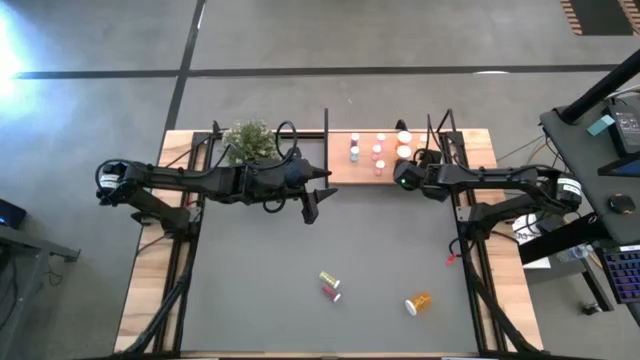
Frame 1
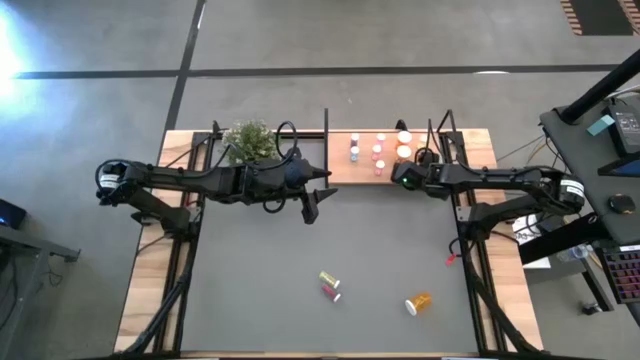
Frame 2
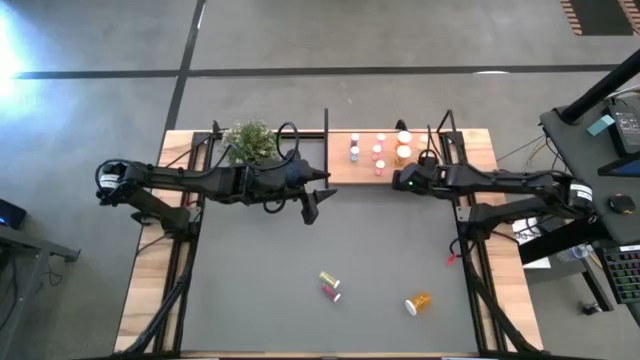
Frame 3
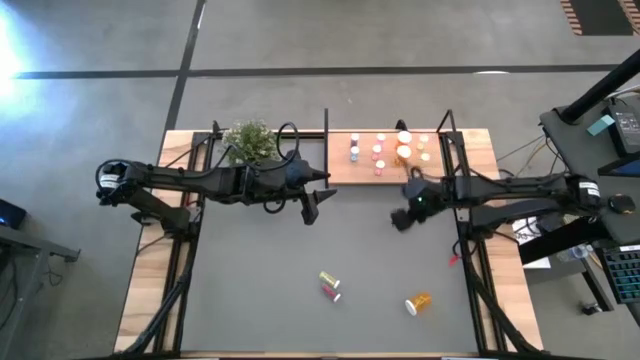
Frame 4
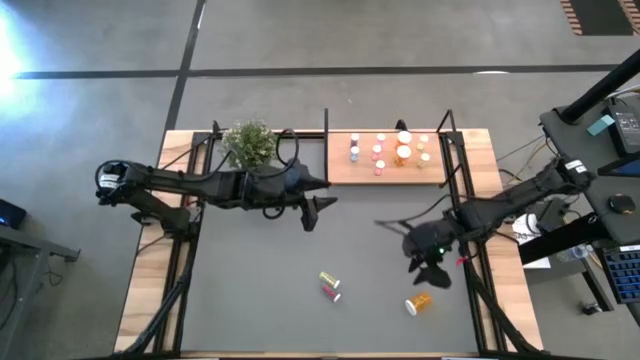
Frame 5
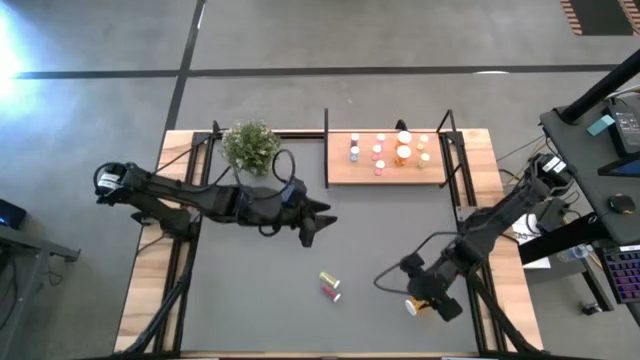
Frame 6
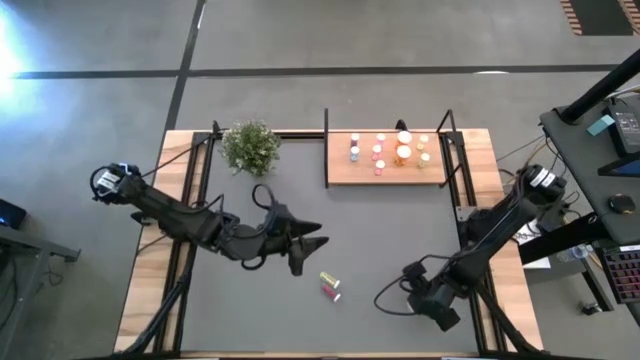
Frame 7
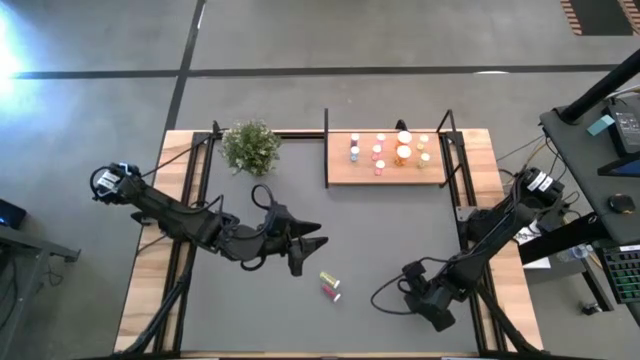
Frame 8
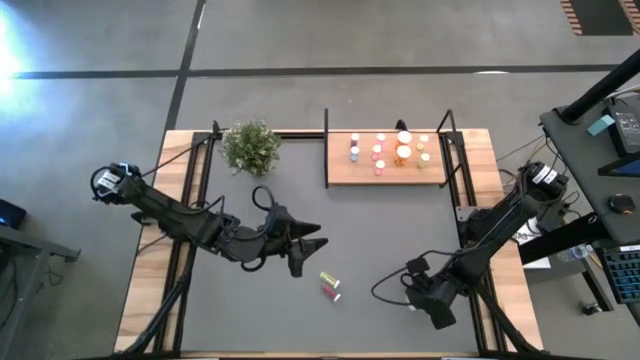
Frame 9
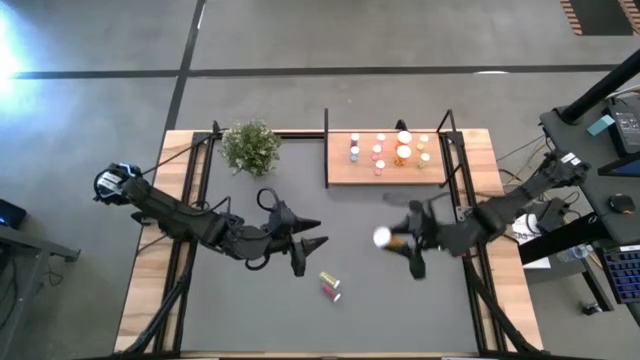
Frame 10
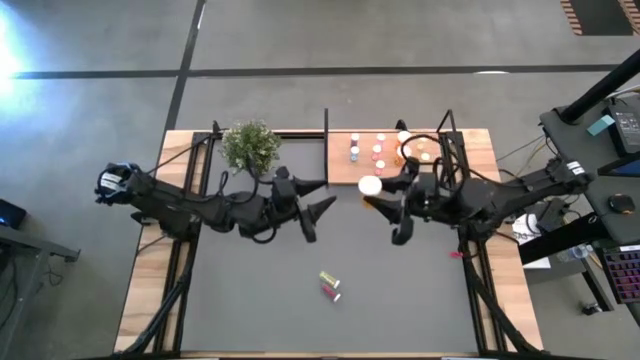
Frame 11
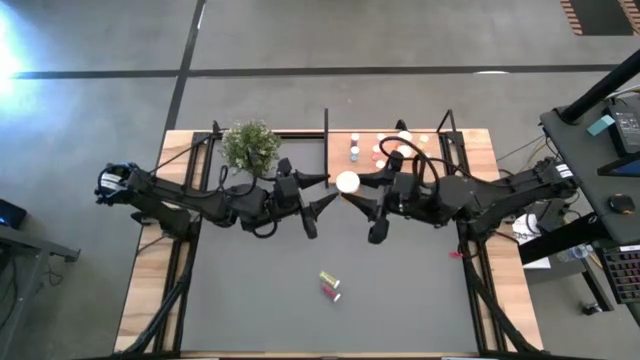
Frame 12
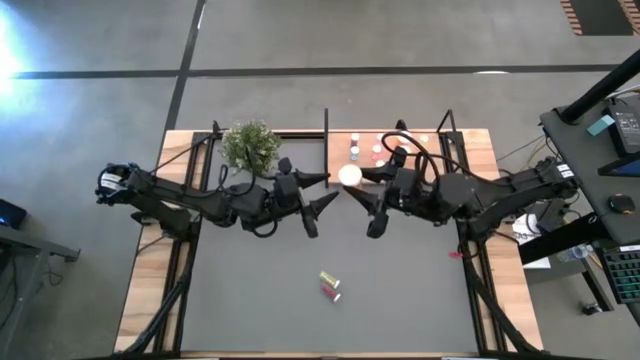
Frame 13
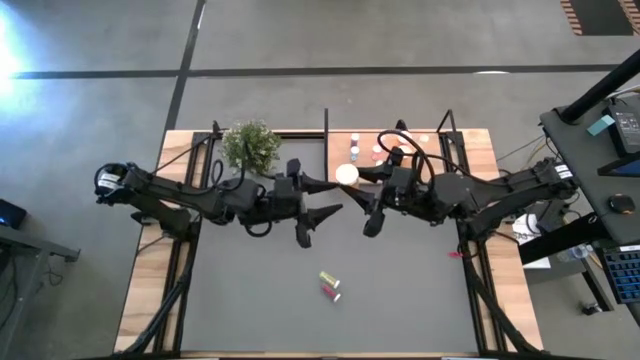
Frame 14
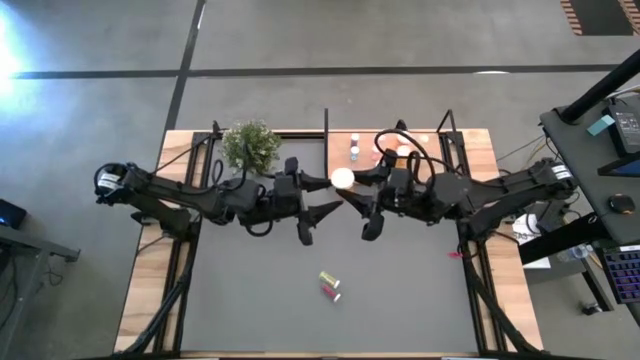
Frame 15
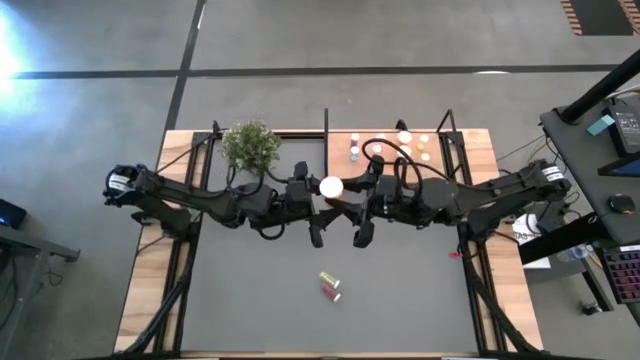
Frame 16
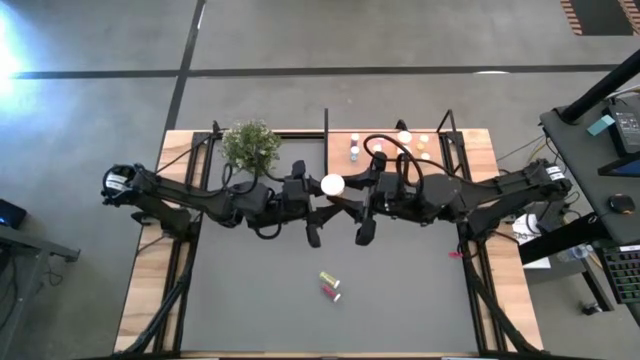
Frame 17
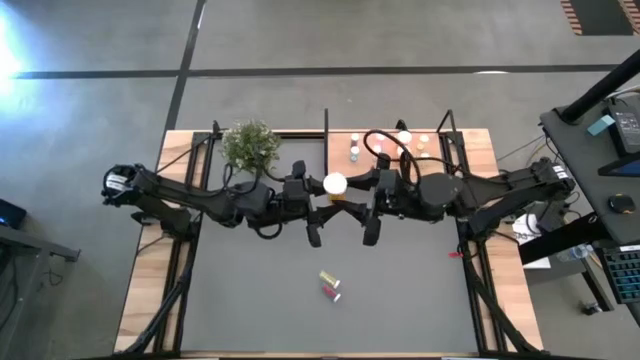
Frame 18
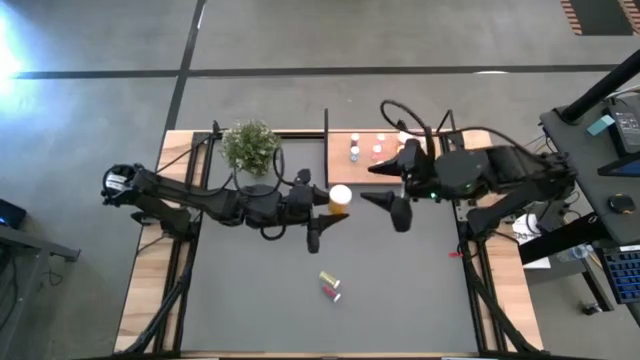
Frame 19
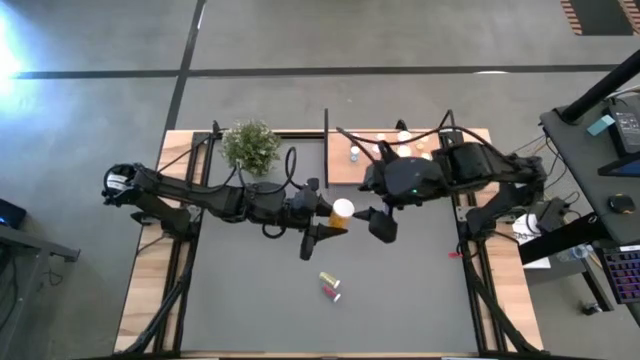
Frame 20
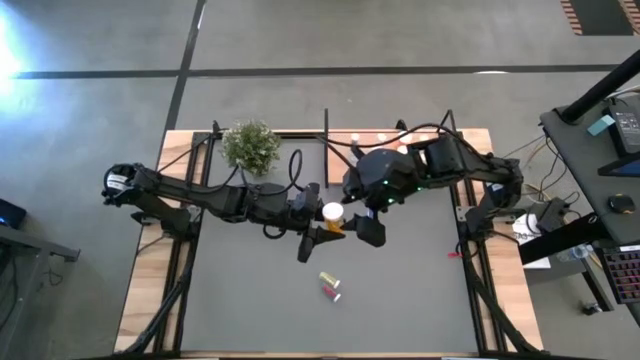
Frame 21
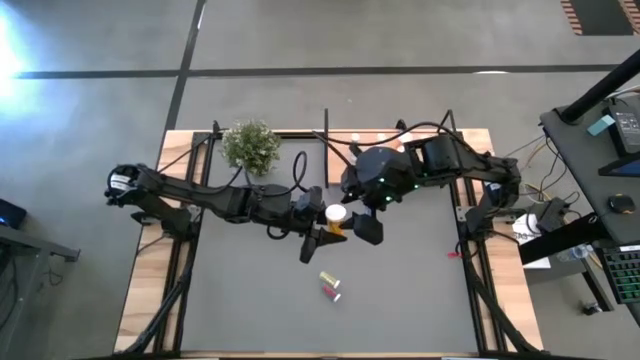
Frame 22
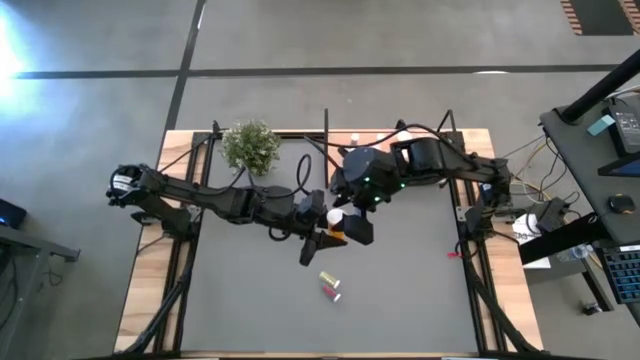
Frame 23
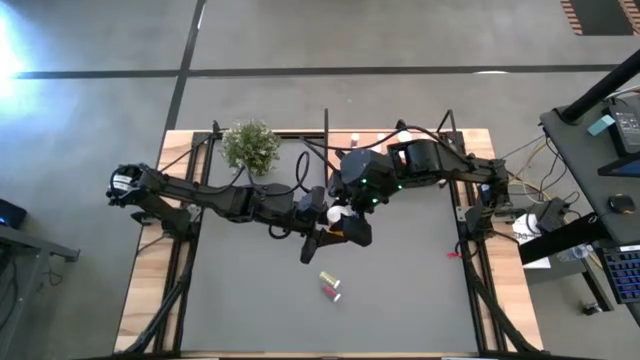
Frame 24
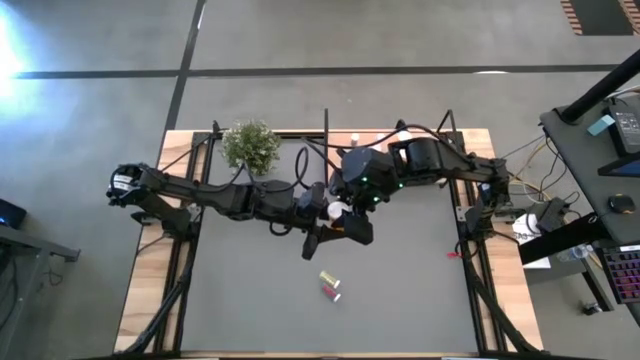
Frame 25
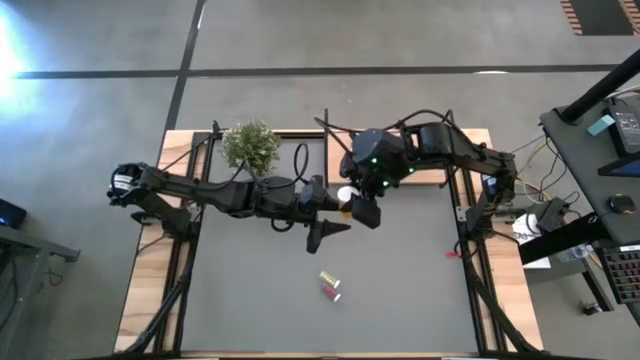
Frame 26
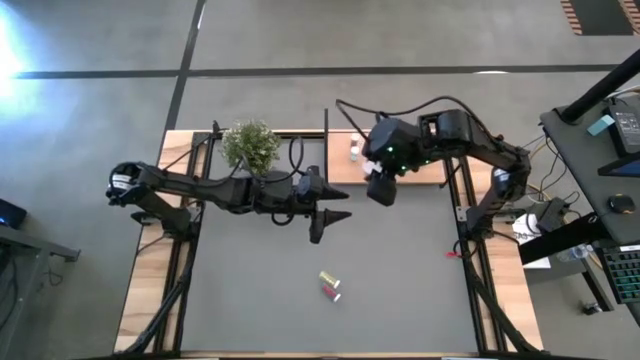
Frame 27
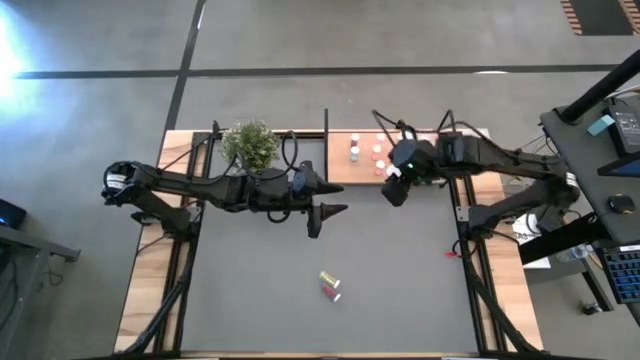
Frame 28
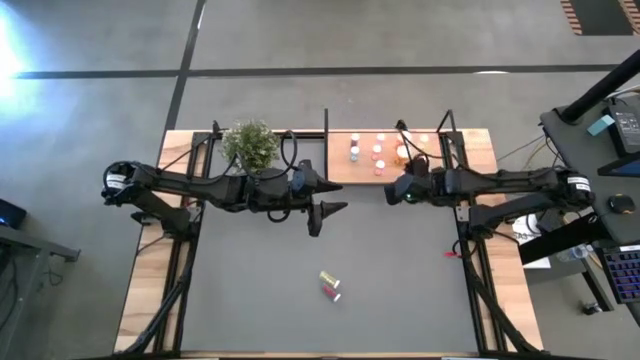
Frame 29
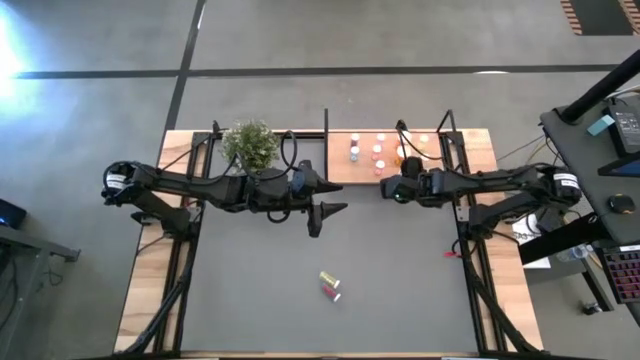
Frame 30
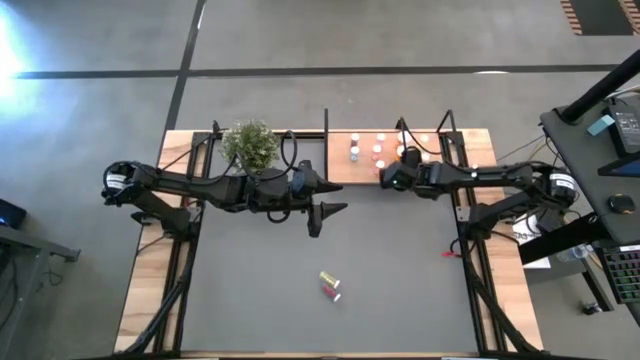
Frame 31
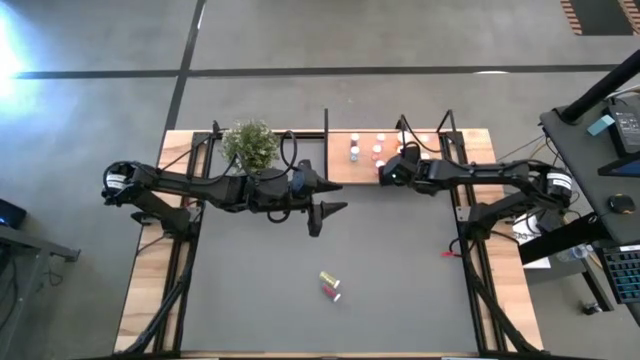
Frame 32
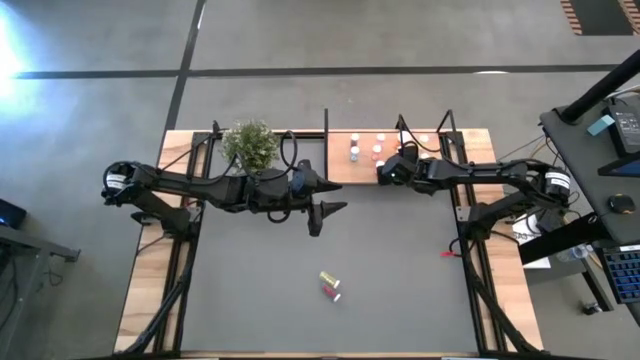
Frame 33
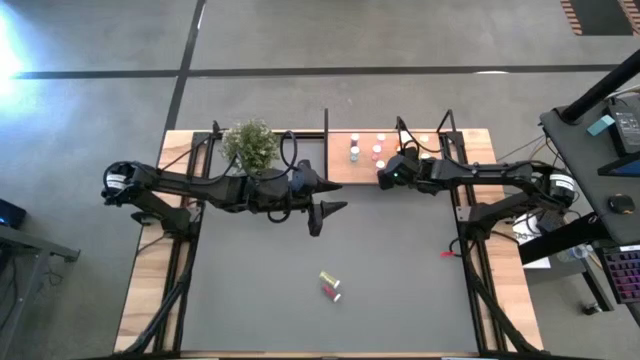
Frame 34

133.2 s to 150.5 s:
Task: Pick and place medicine bottles onto shelf by color
Put the orange pill bottle on the shelf aligned with the other orange pill bottles

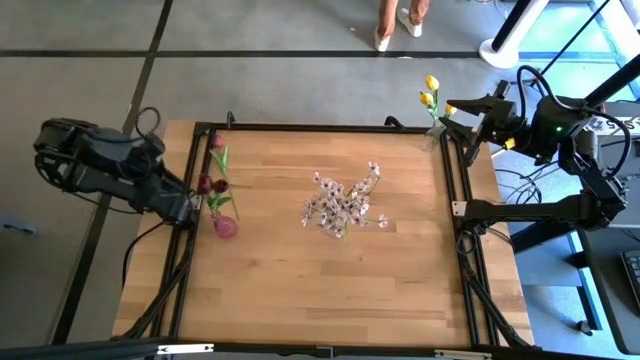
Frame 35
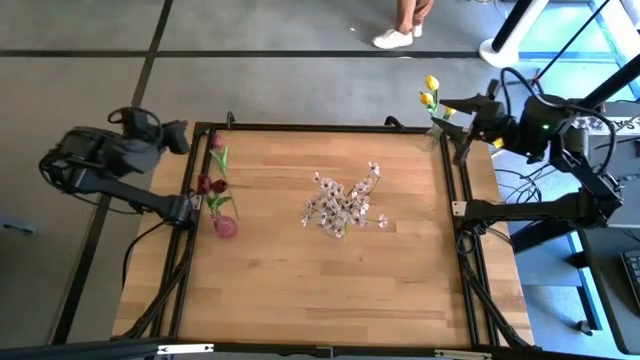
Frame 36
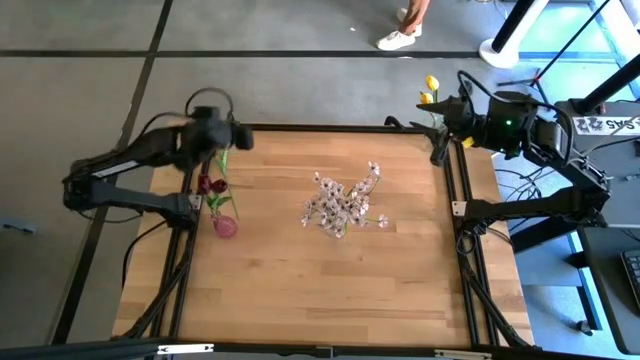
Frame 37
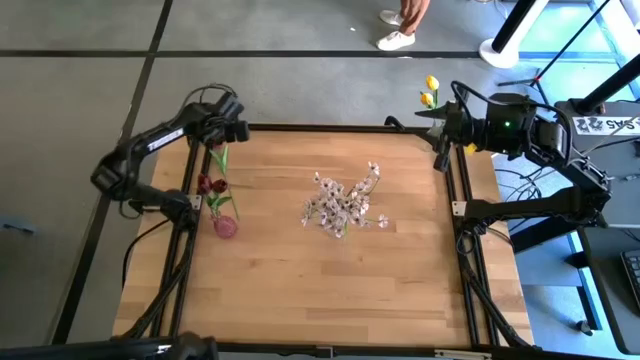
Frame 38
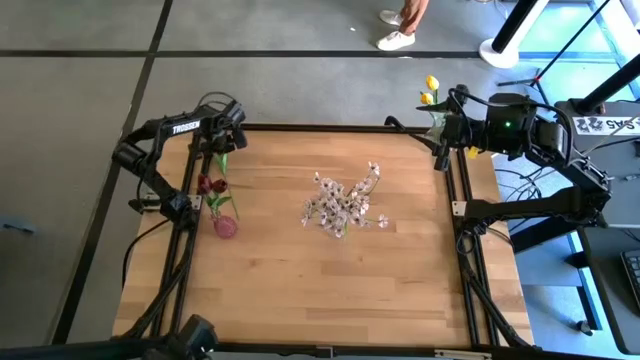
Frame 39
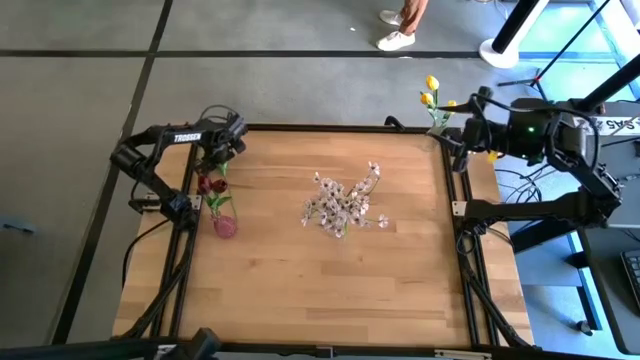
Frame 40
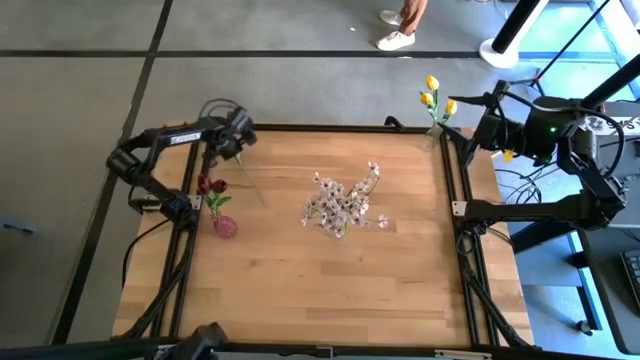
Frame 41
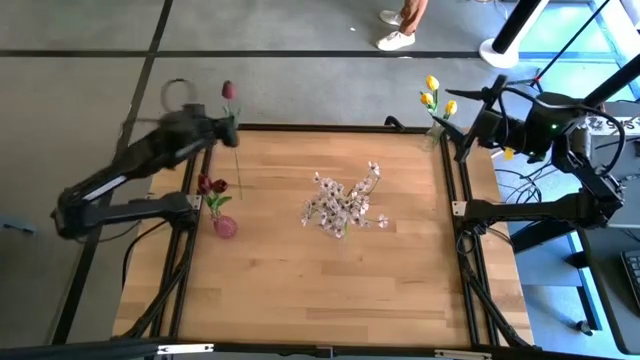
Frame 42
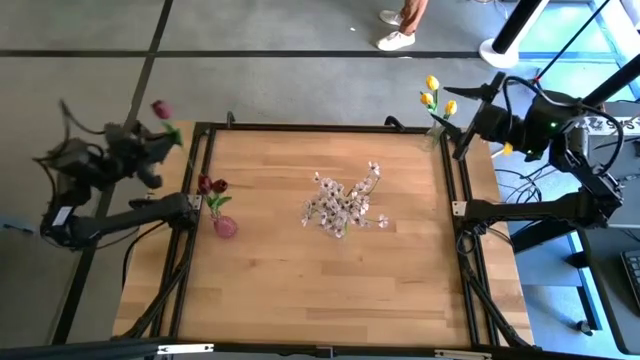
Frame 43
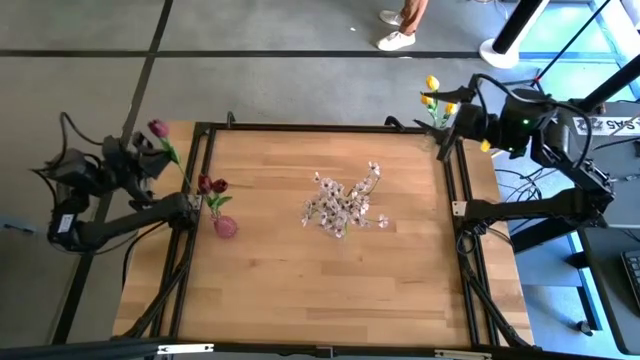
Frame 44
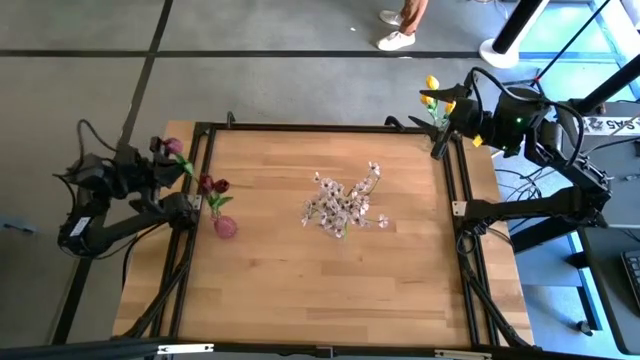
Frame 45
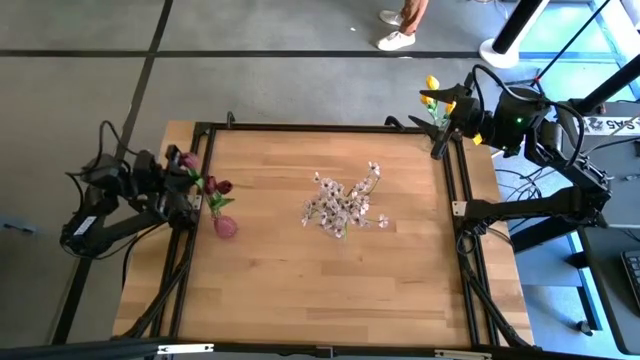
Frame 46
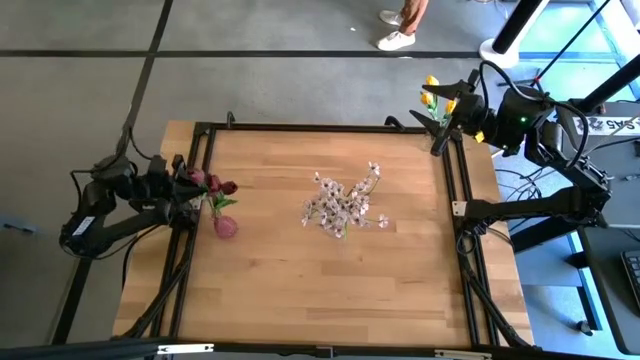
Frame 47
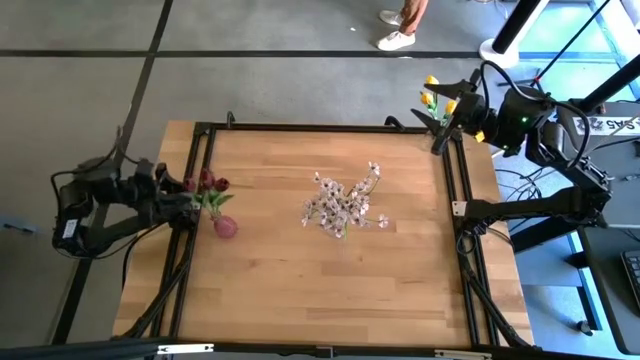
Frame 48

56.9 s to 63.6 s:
Task: Sort flowers into vase by color
Put the red tulip into the violet vase
